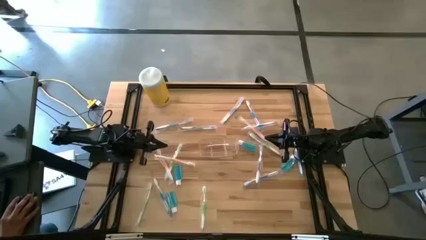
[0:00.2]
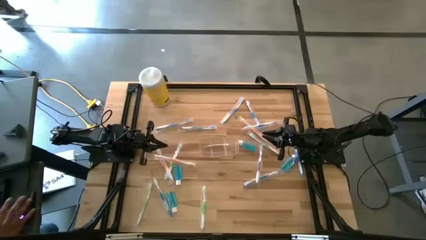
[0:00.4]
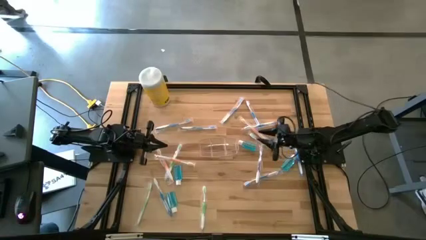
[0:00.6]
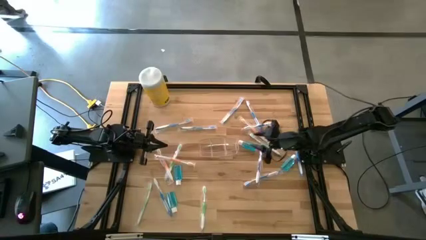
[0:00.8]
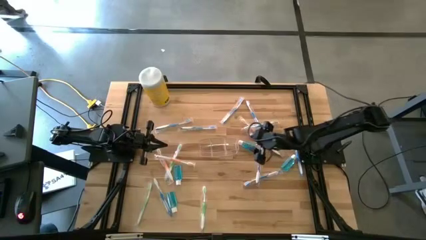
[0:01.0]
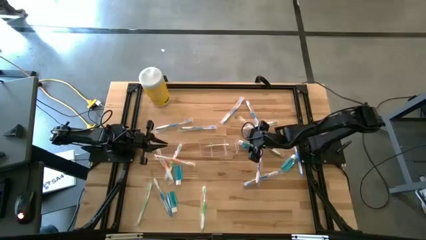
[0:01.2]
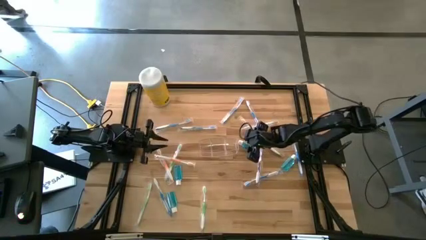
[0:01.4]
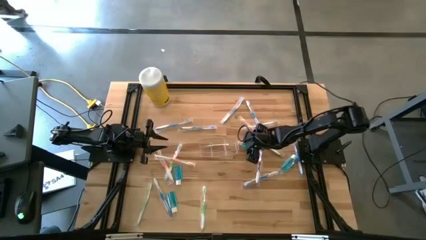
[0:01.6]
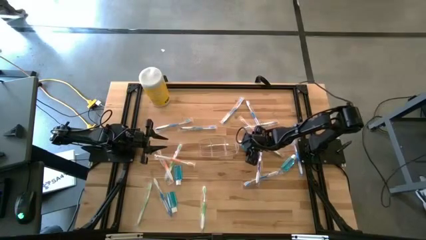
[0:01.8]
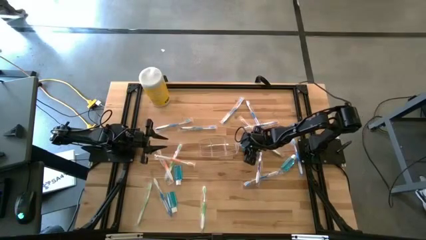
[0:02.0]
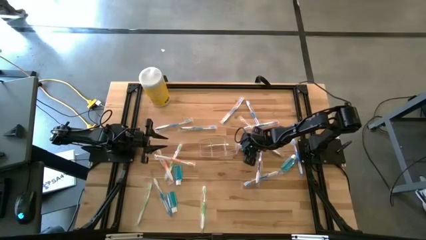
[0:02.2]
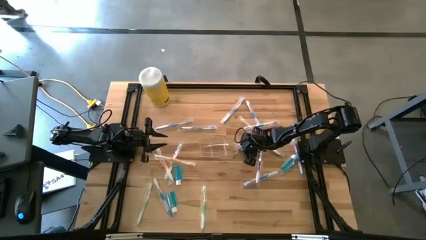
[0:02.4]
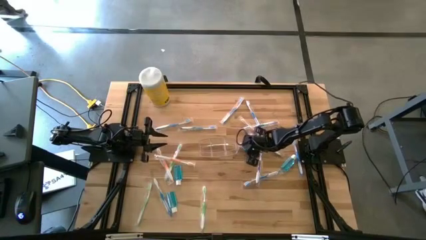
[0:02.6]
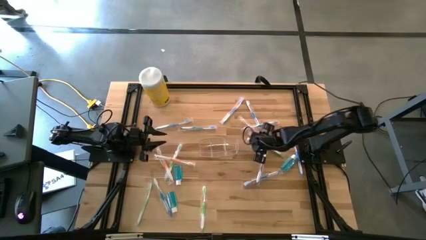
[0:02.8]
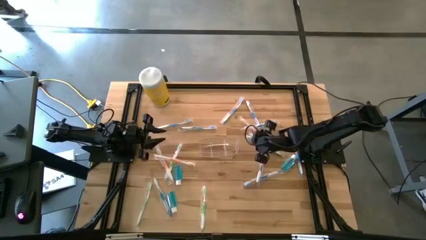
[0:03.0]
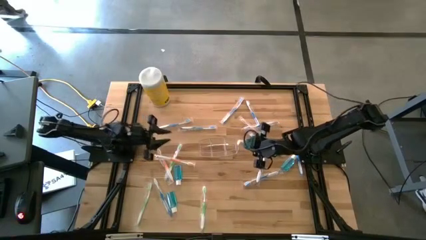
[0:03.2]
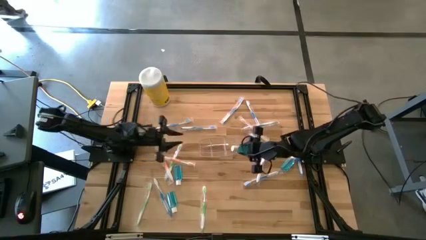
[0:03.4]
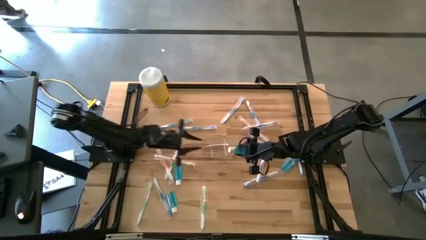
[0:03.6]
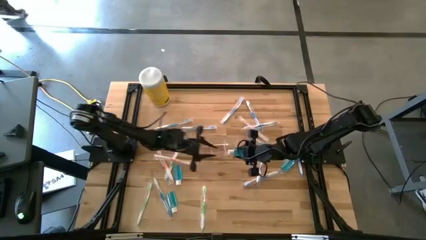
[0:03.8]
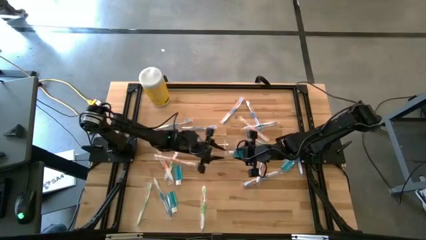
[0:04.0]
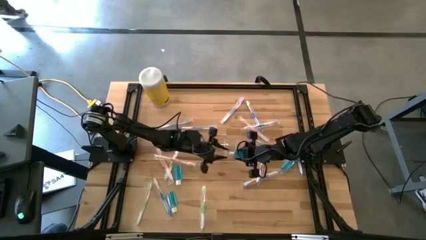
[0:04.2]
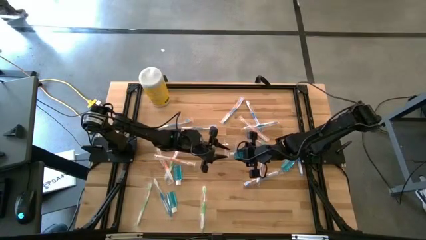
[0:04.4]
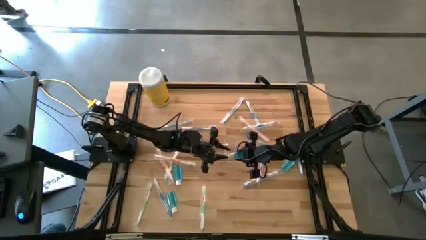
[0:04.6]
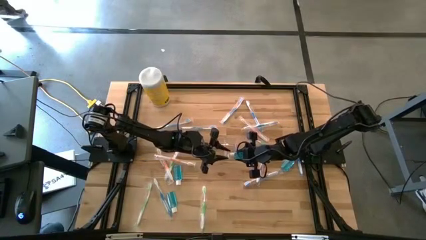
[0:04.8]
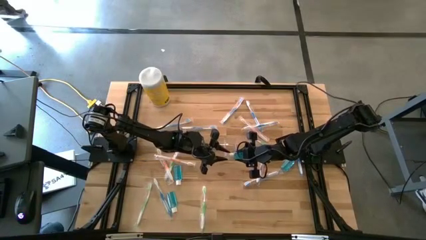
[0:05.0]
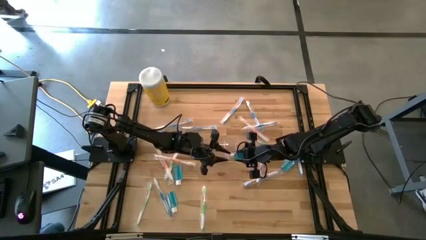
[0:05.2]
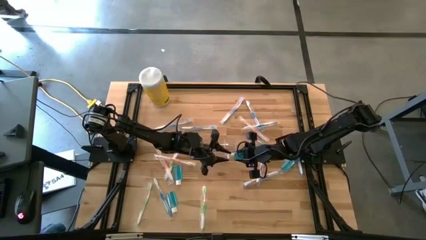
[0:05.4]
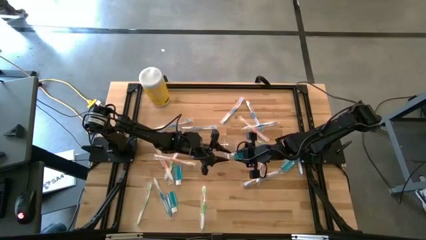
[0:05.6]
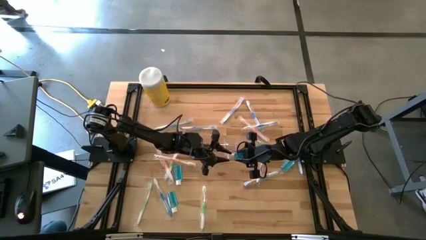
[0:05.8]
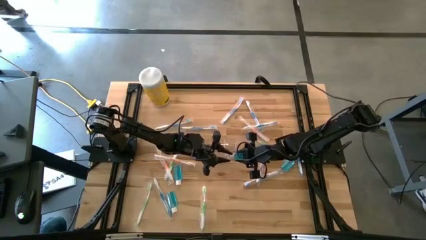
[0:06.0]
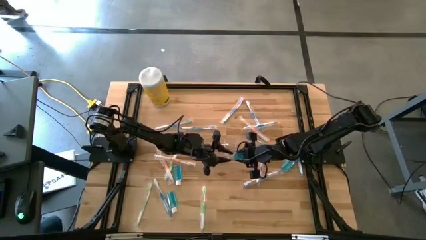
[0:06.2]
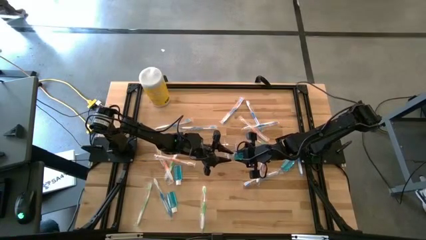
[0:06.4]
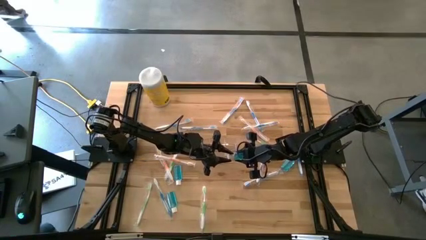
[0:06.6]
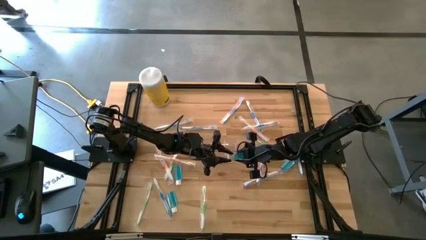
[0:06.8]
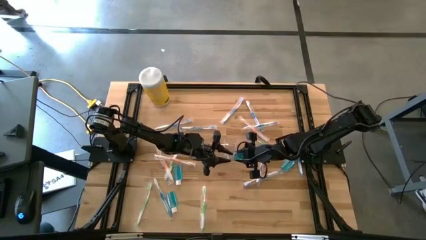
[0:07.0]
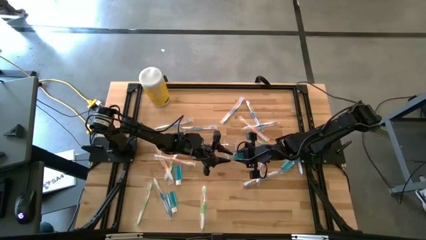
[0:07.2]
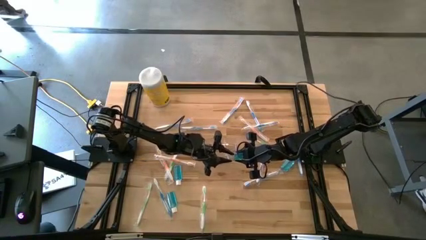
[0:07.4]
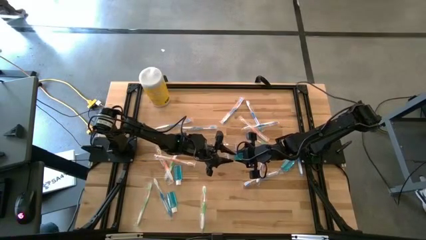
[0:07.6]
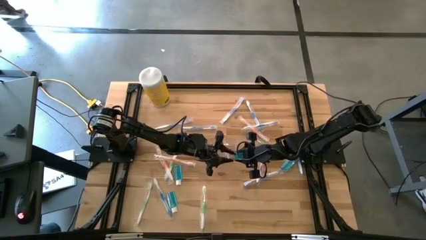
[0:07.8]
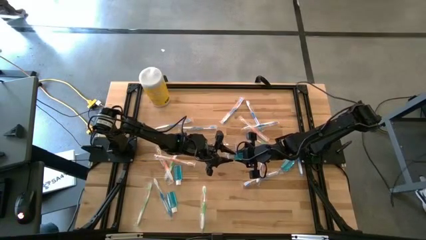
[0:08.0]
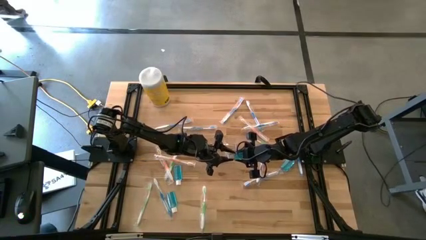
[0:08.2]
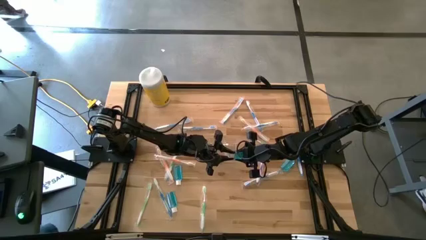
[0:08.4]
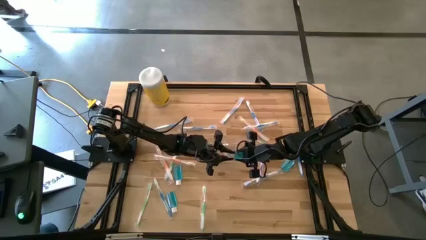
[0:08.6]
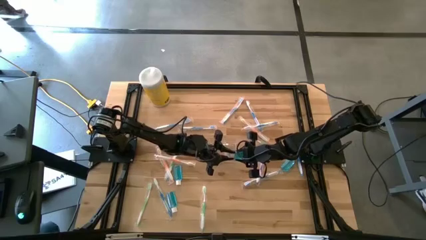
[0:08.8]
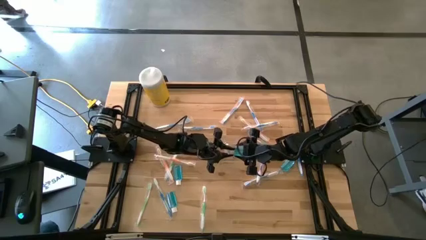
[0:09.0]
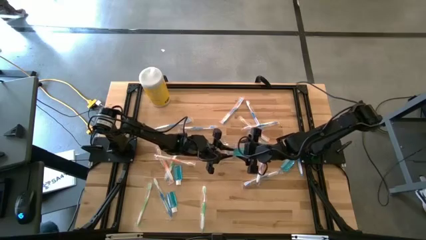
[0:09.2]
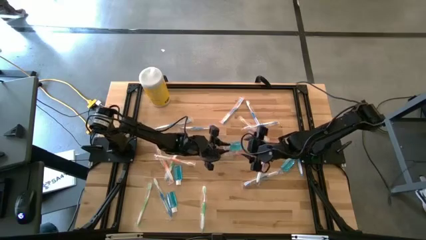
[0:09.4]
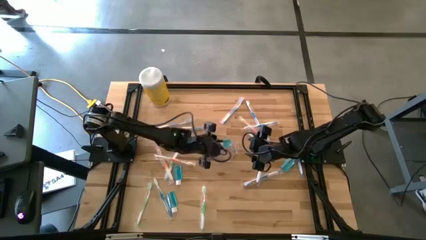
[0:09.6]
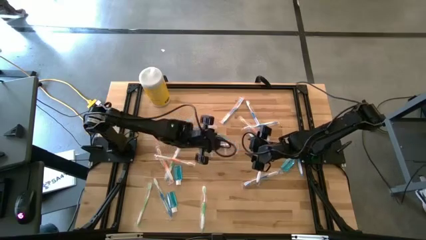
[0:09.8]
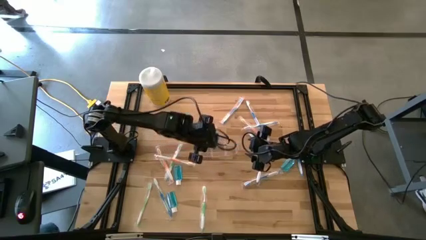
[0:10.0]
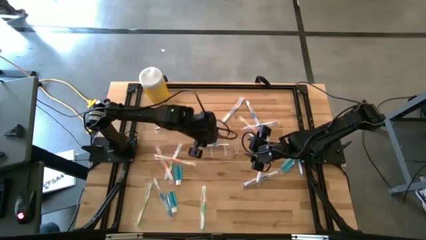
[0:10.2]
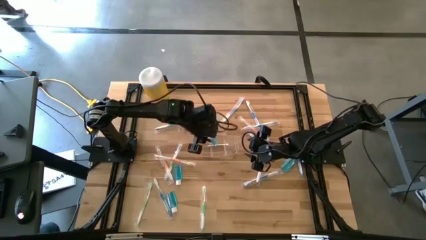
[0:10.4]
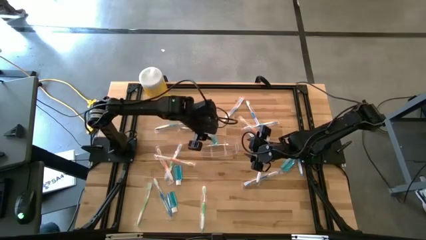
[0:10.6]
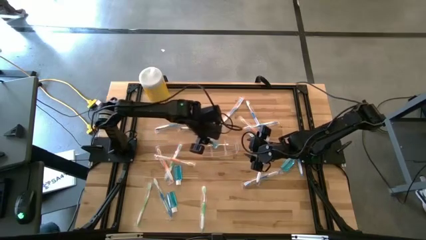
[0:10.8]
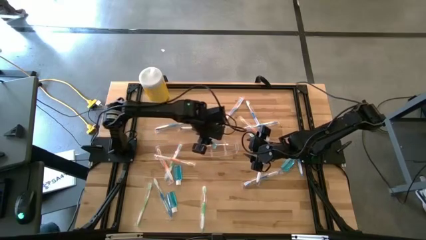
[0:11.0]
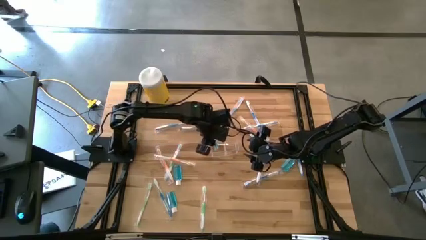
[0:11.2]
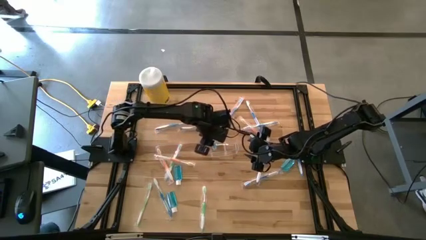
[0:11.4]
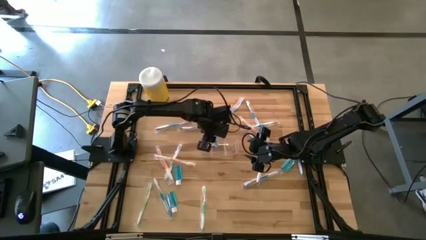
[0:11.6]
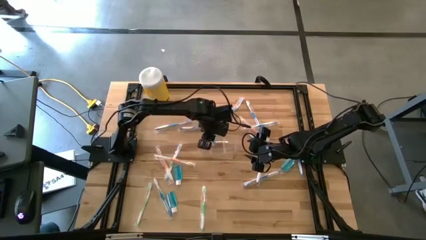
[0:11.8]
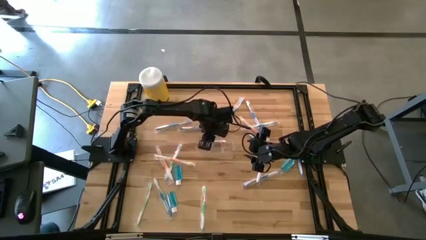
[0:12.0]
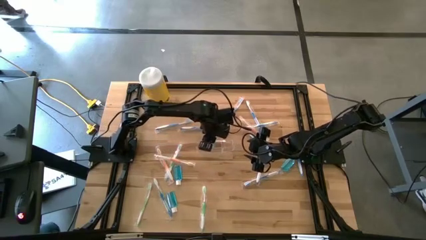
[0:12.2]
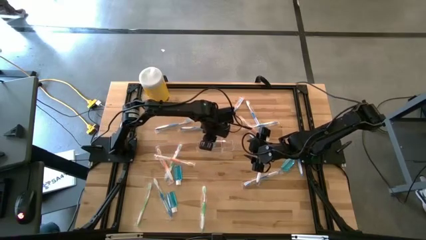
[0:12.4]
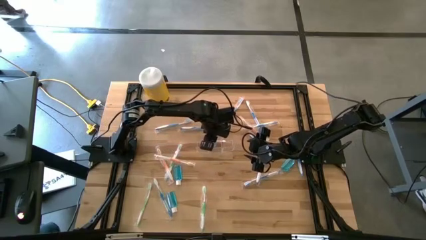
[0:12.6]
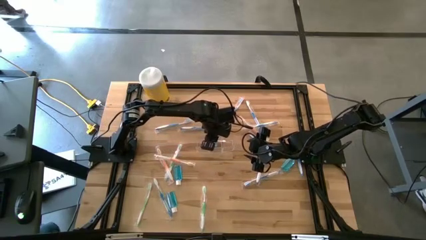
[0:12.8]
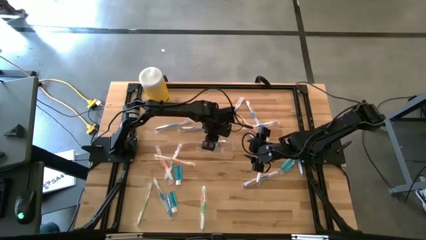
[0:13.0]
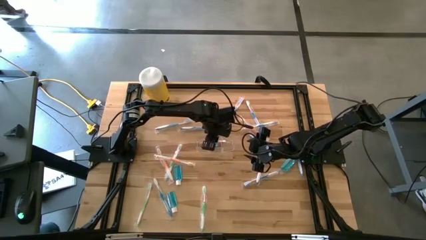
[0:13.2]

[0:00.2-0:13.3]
Task: Pick & Place toothbrushing station
Put the blue mouthwash into the transparent organizer
